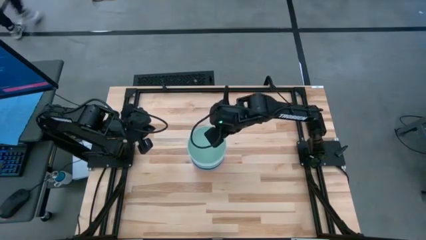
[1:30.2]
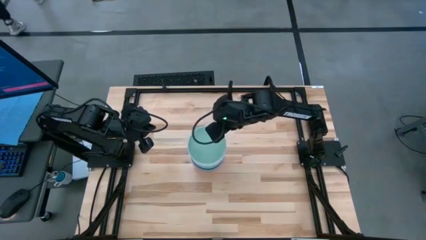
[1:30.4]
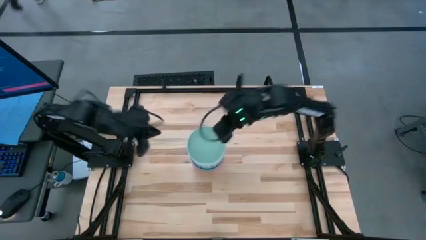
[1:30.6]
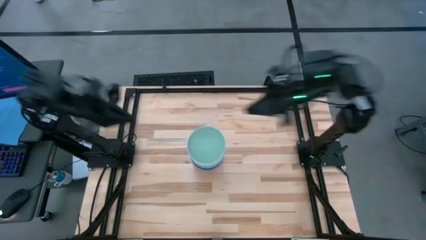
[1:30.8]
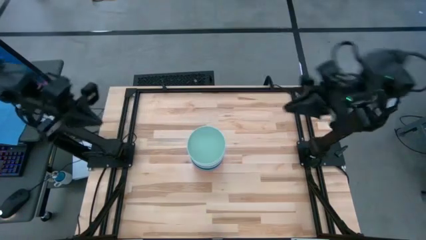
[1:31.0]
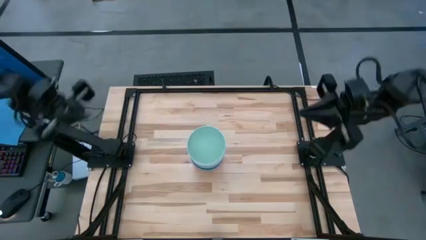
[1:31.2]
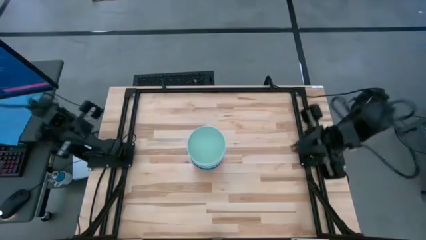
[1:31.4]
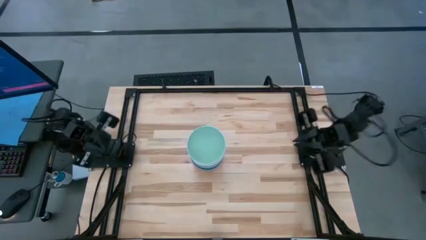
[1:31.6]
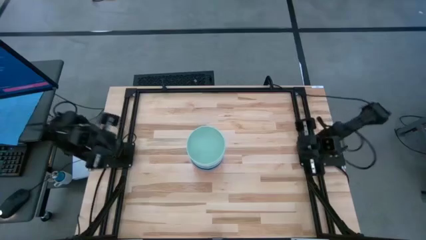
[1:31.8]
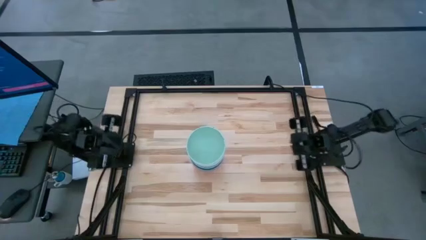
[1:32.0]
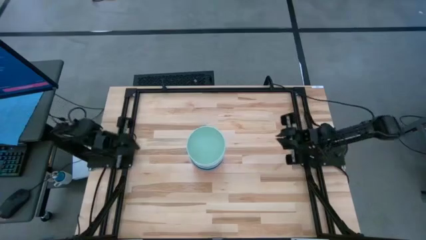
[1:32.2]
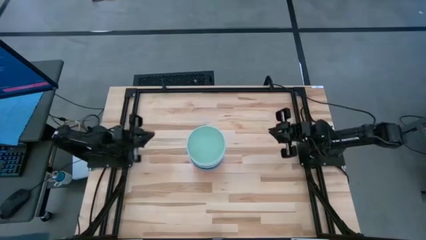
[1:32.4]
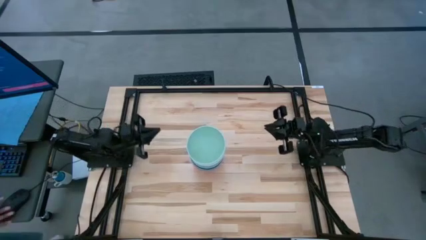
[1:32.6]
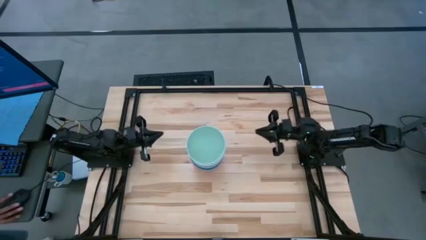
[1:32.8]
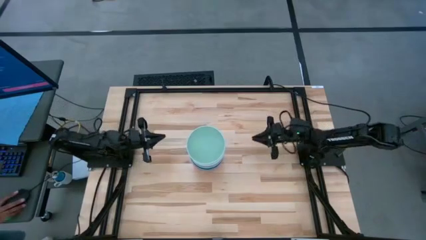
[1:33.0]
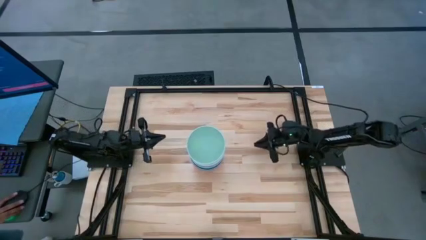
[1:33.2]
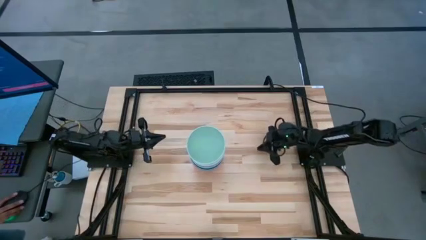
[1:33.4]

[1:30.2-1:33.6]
Task: Nest bowls inside each other
Return to Home Position

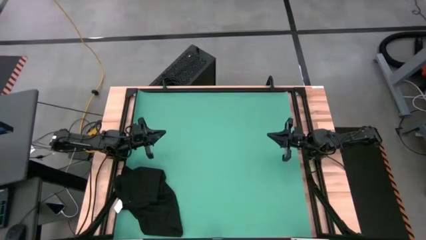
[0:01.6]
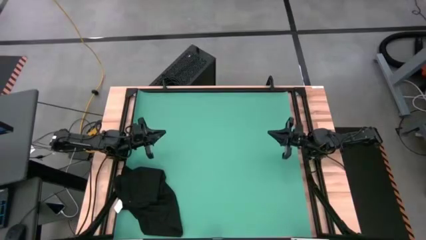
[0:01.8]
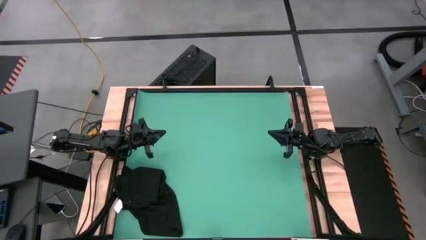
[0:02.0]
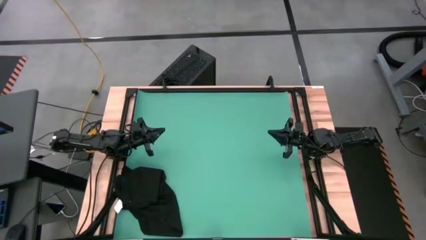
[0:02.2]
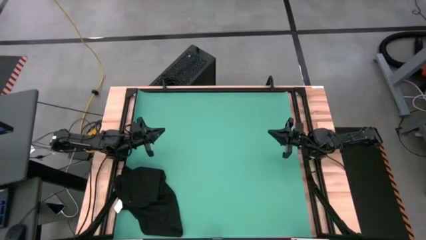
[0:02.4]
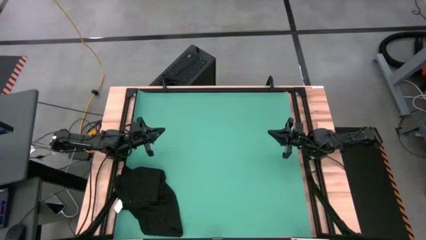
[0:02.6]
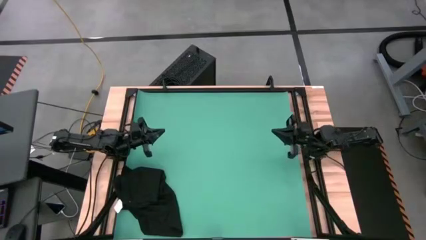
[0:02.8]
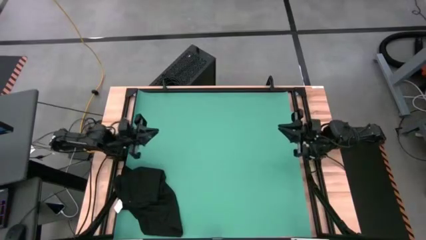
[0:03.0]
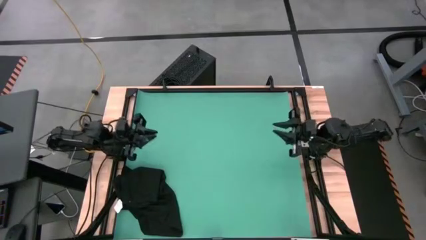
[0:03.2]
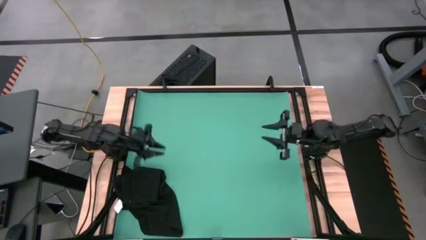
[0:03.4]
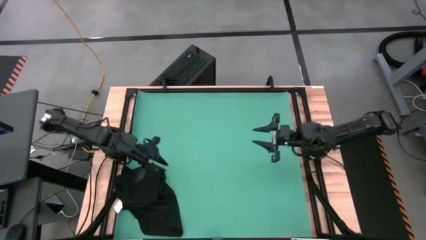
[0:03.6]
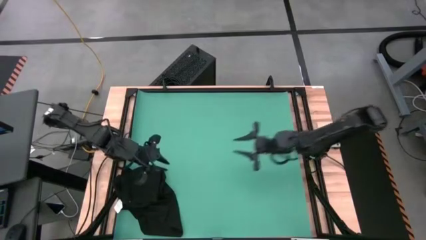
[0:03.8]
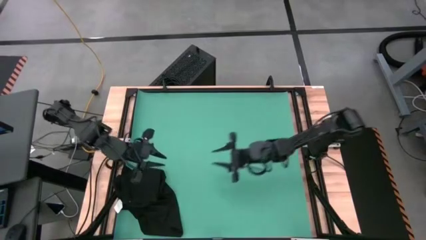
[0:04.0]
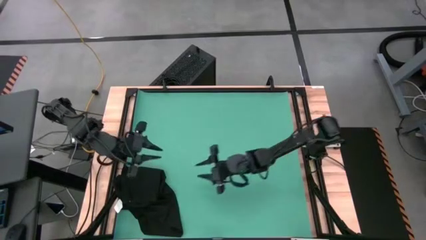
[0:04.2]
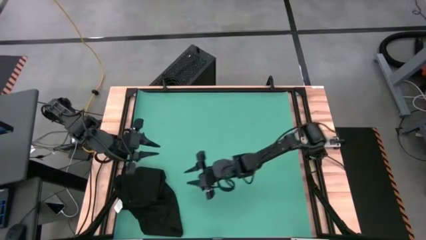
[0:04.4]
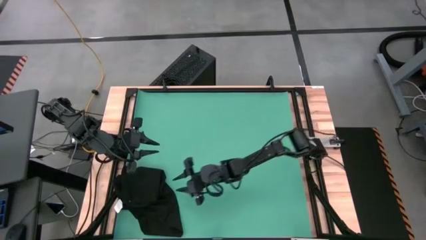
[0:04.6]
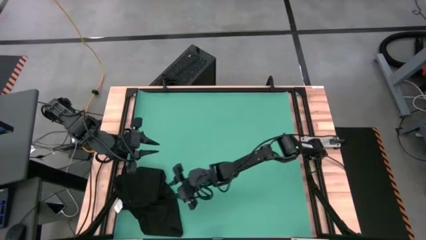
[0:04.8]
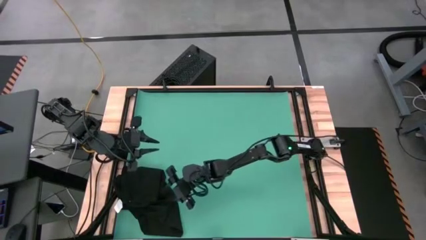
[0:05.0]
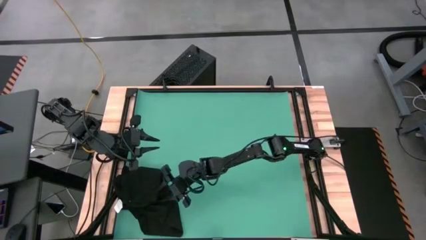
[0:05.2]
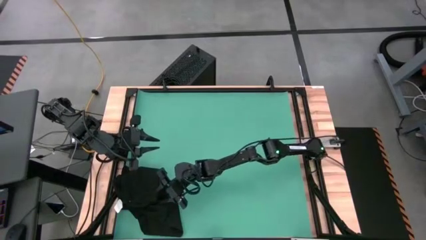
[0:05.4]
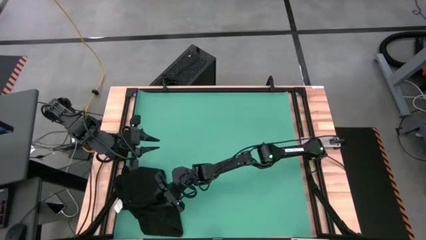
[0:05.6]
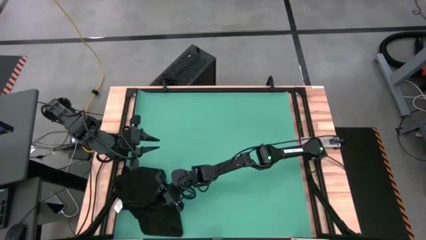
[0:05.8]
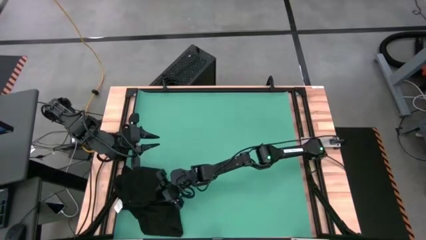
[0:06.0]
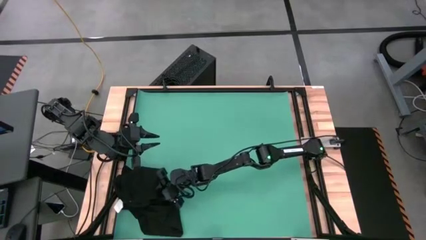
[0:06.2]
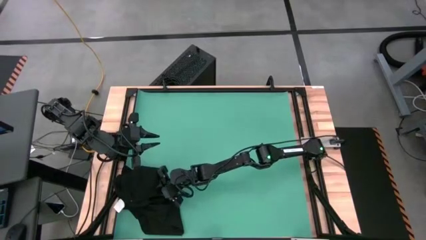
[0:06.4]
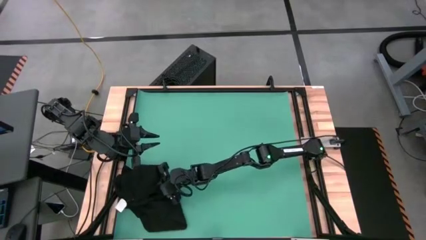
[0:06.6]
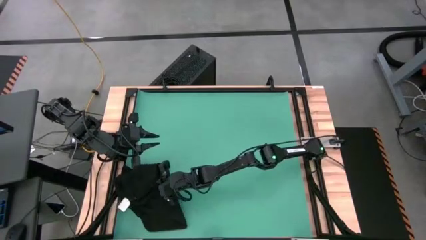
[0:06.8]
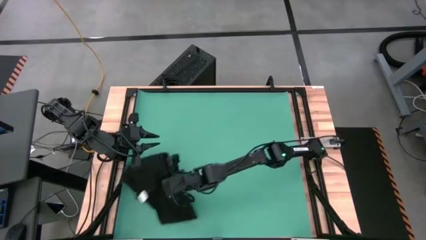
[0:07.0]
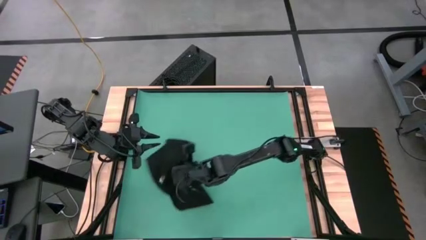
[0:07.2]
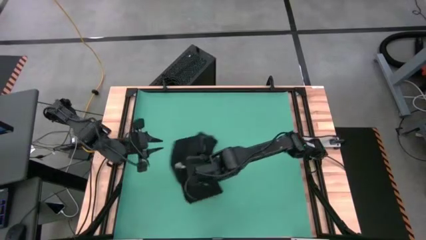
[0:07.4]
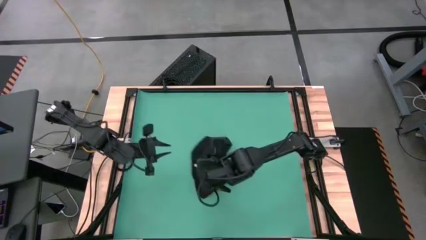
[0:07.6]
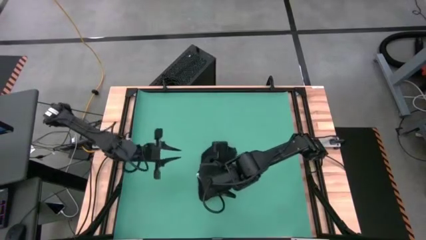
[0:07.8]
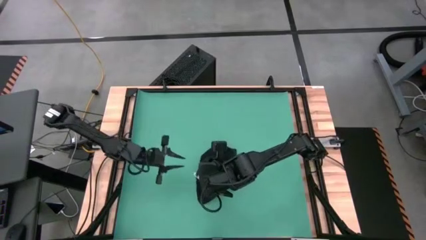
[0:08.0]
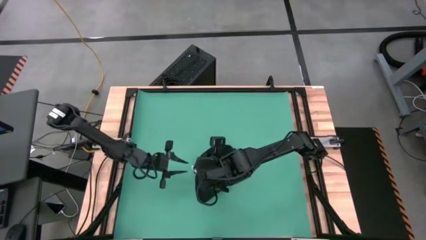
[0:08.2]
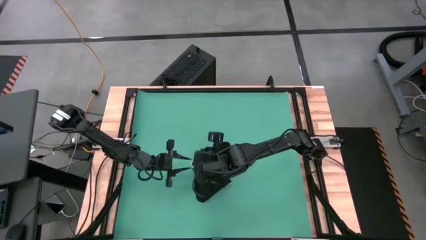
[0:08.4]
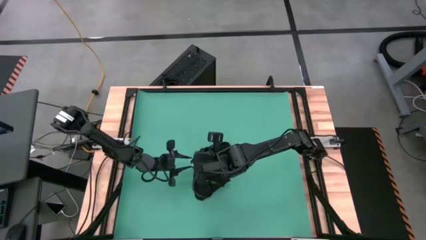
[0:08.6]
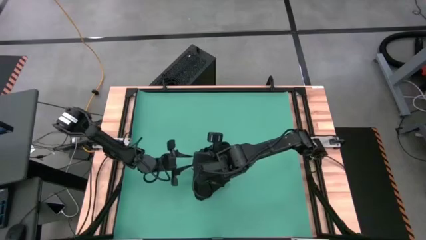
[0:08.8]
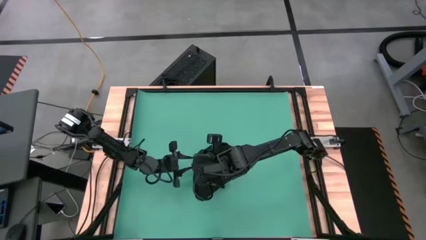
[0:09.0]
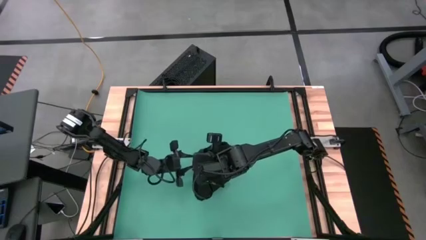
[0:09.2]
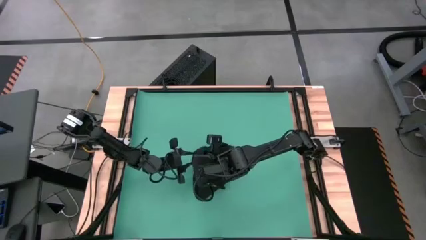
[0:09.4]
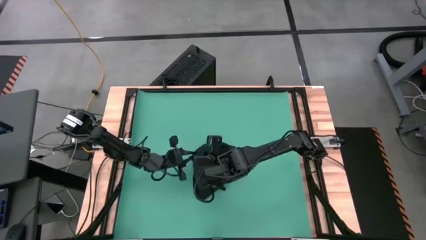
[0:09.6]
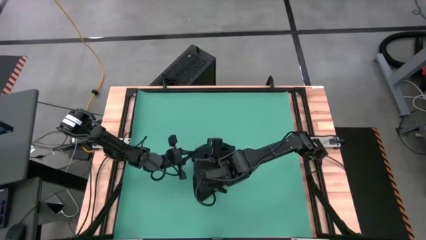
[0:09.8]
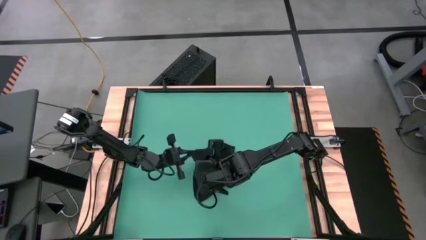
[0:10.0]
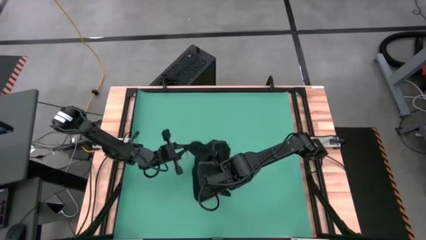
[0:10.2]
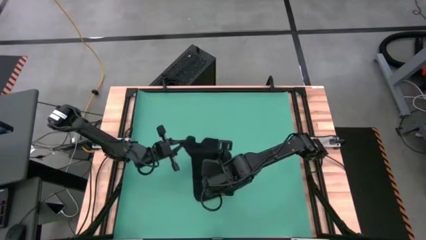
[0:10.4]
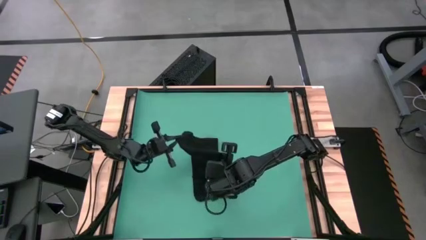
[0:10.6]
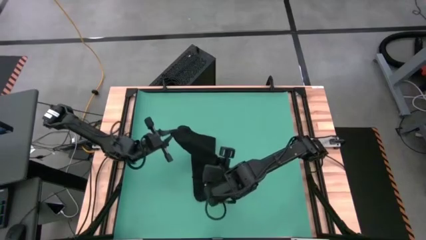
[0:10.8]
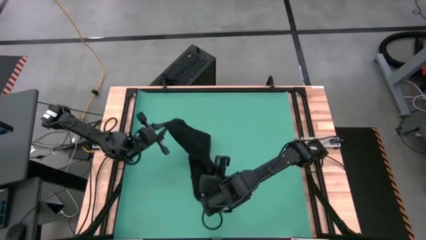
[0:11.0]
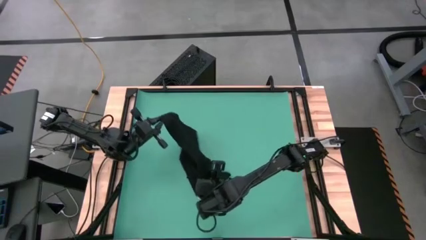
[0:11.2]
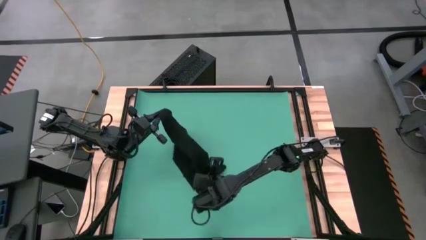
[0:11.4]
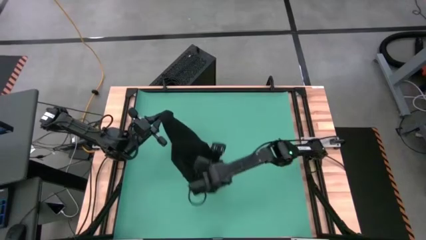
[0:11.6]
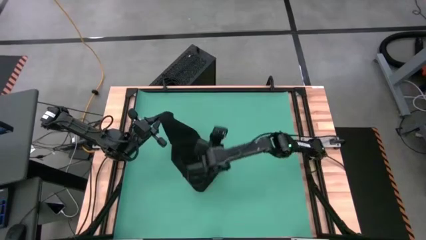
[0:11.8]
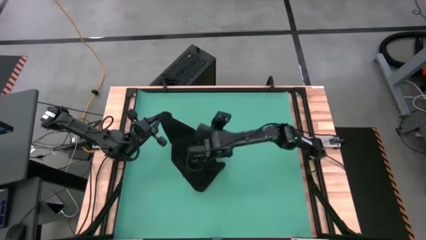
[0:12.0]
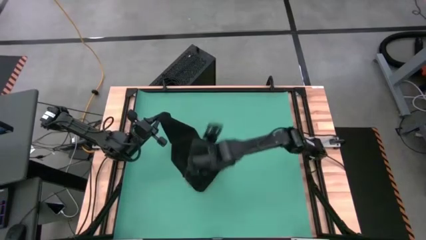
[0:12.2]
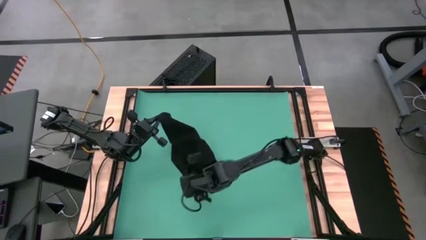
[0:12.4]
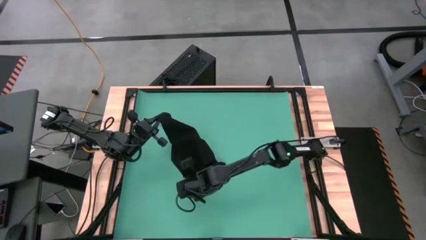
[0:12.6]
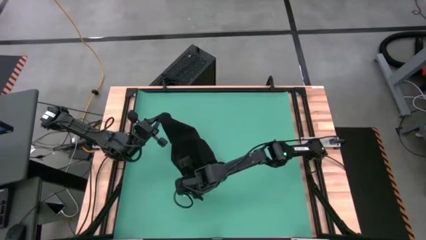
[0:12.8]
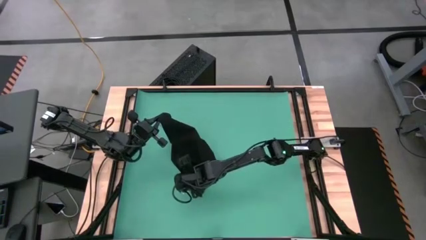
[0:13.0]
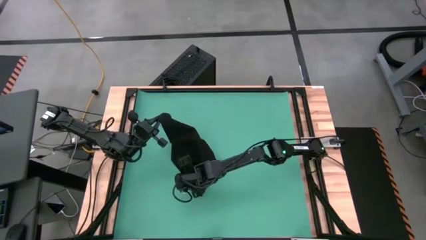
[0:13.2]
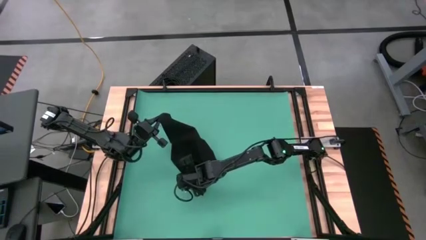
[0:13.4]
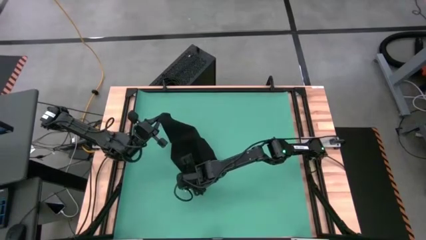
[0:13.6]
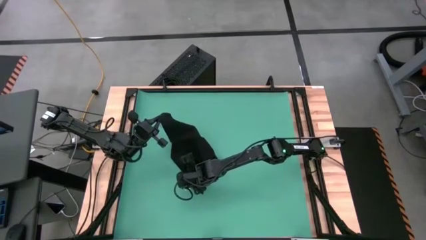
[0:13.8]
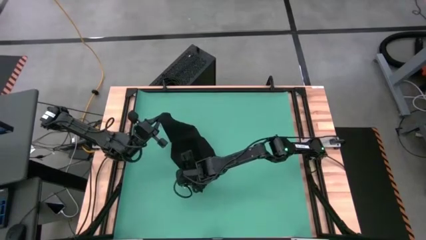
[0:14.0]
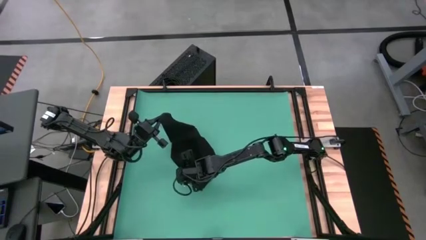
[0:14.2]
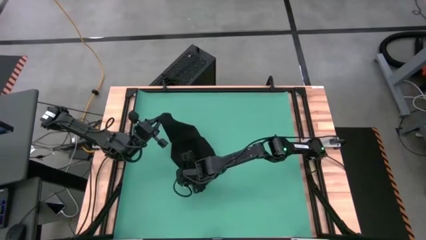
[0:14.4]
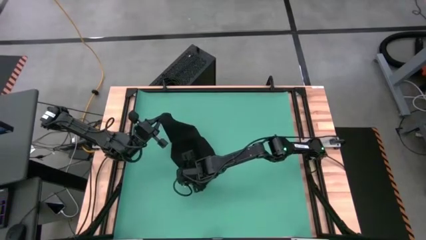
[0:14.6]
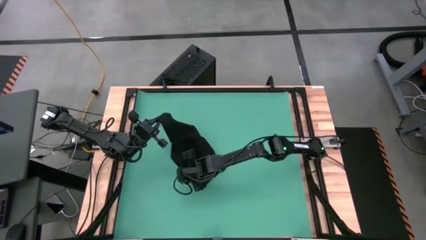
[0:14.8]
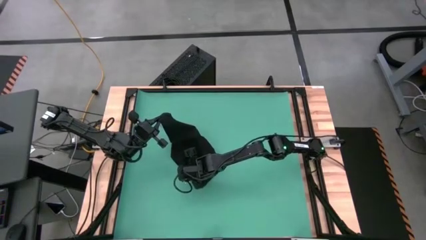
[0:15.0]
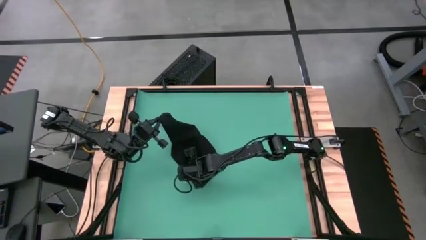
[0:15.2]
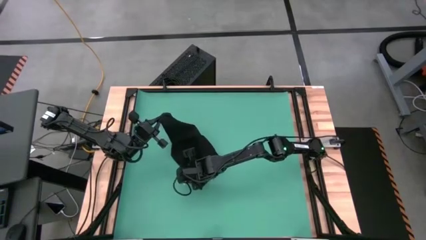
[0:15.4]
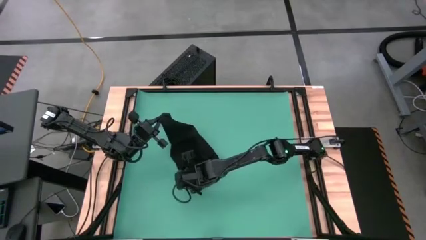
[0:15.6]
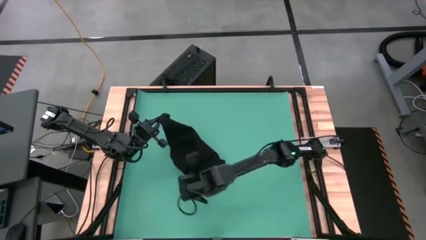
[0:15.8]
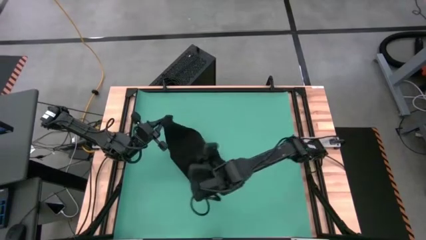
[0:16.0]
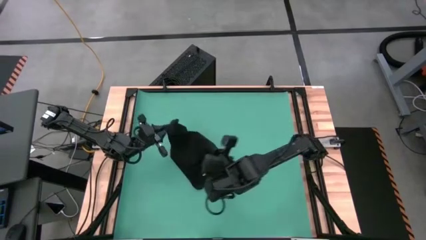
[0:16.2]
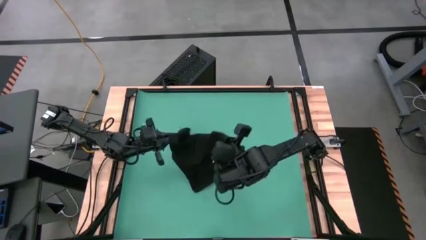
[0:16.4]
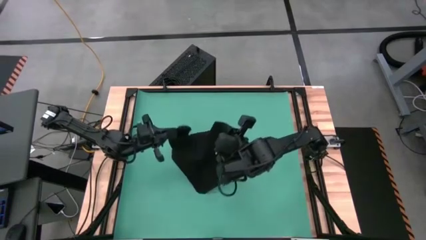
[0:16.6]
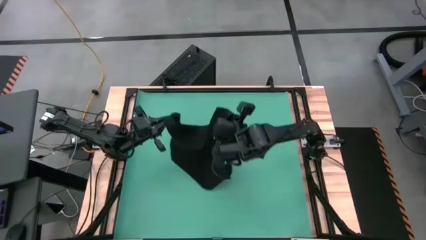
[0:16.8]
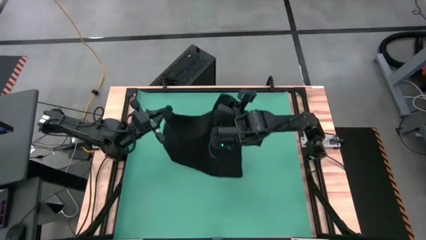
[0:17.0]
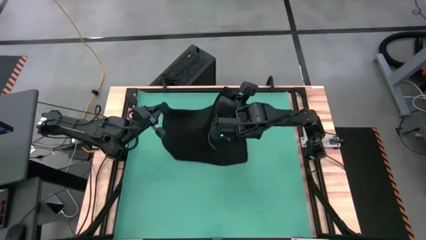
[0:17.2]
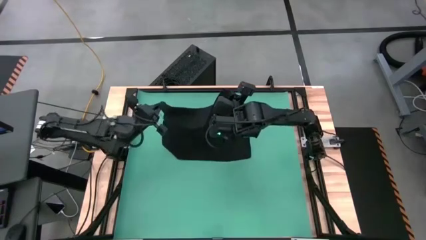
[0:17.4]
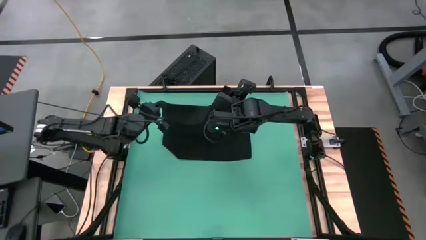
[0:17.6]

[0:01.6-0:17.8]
Task: Roll towel into tight, uniform cylinder
Fold the towel
